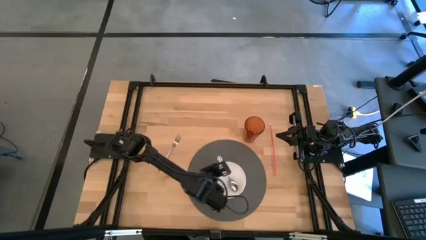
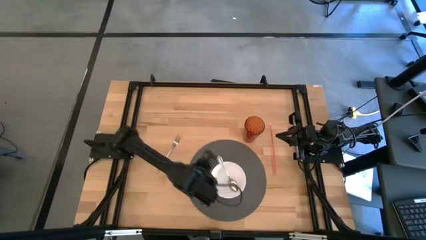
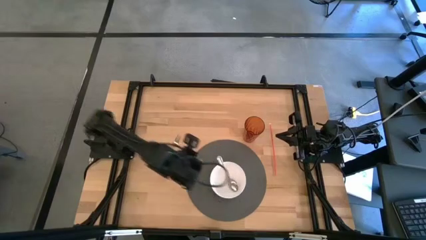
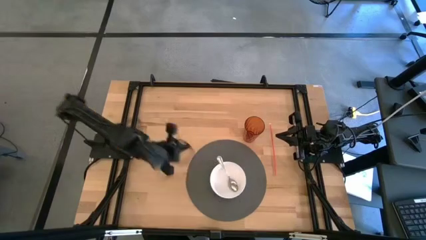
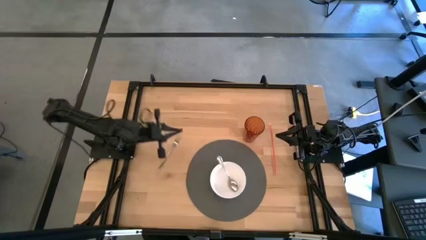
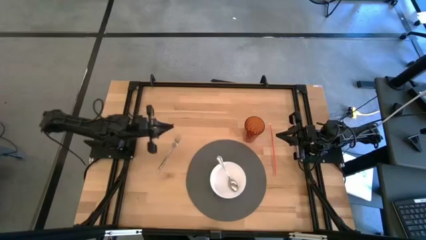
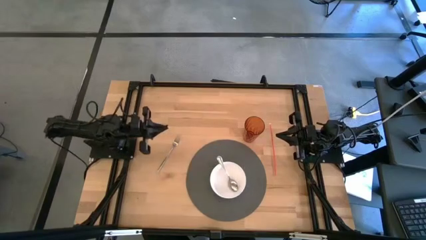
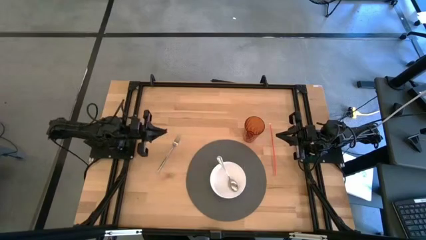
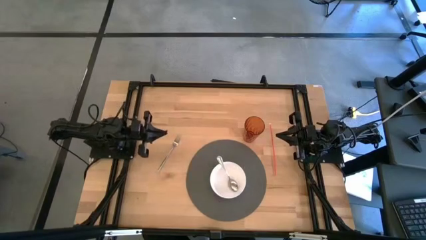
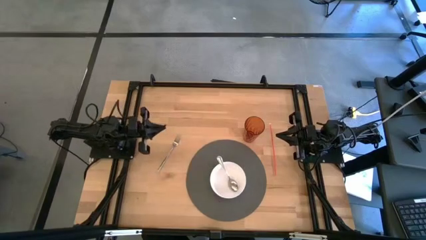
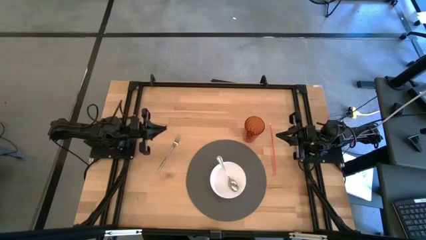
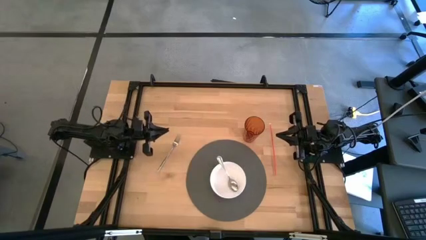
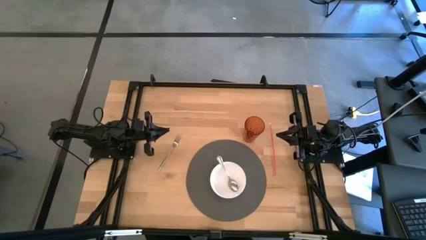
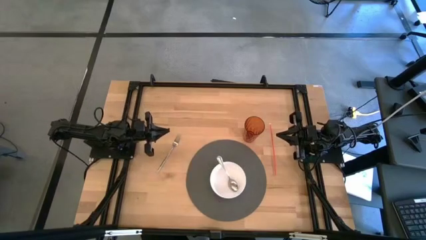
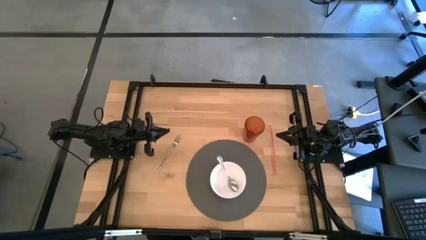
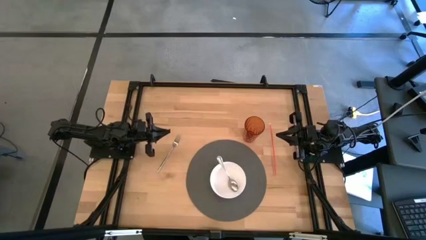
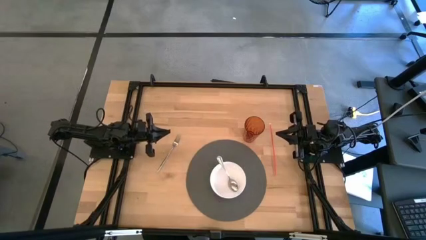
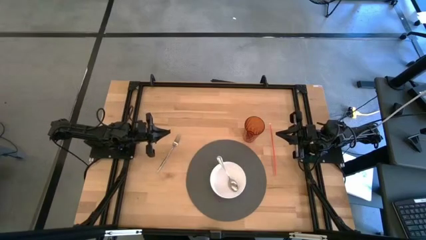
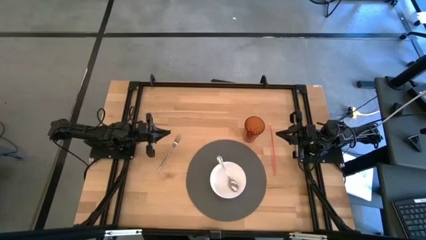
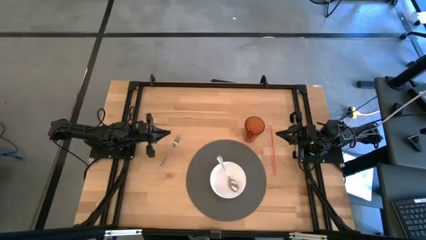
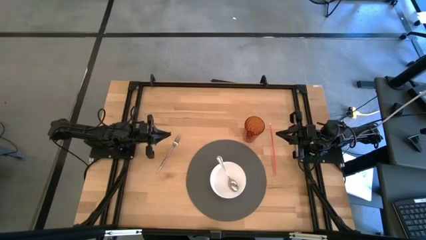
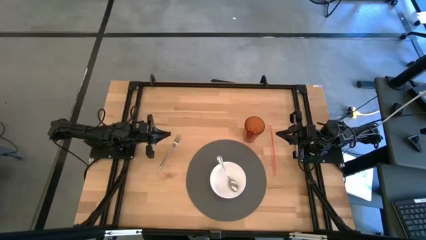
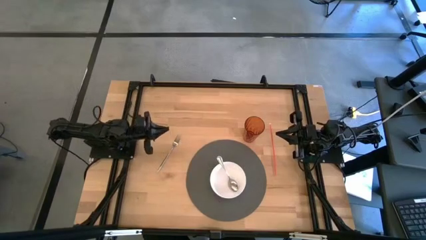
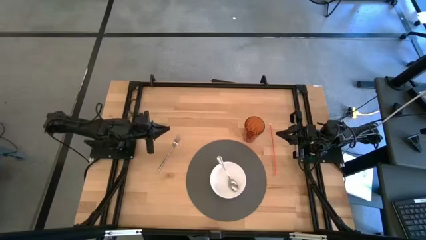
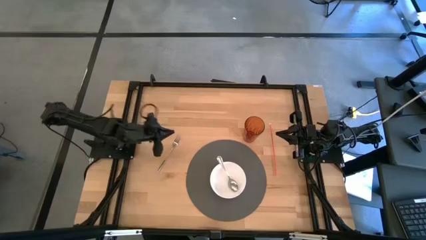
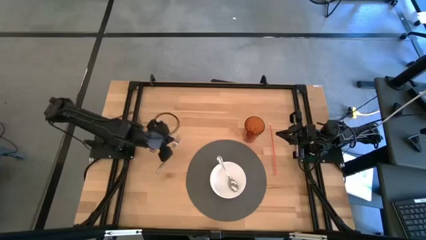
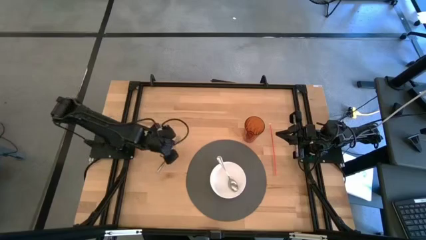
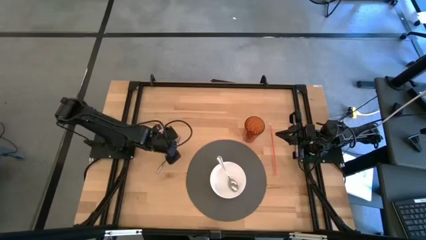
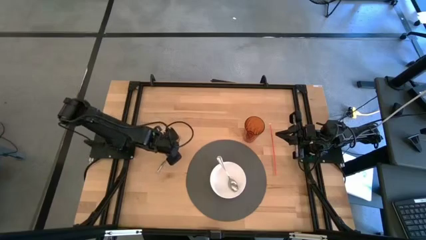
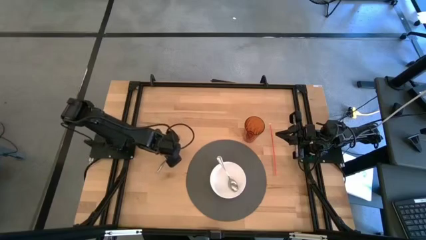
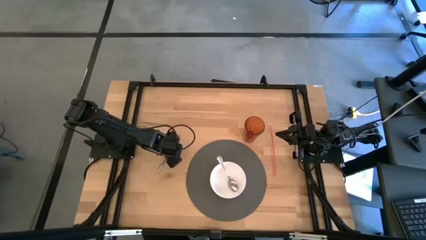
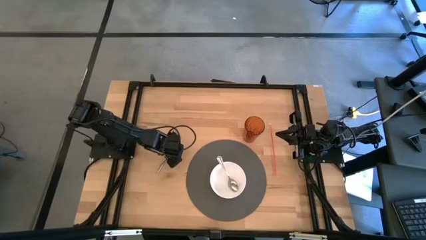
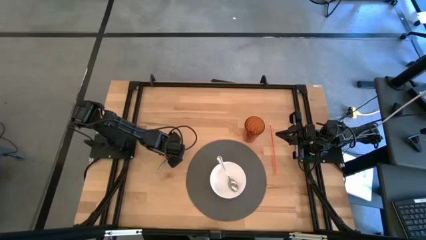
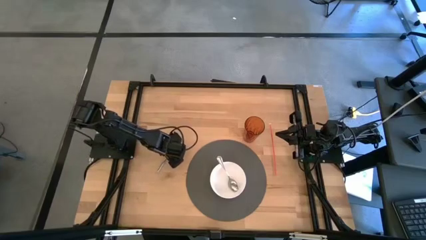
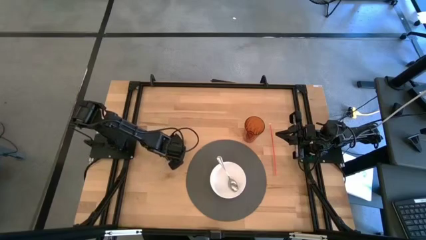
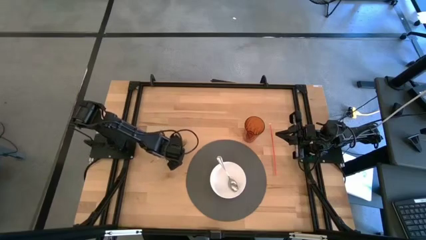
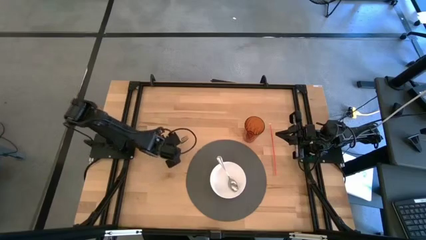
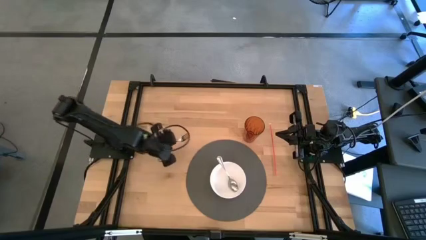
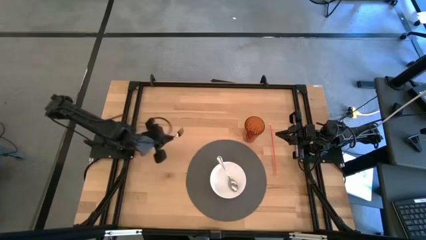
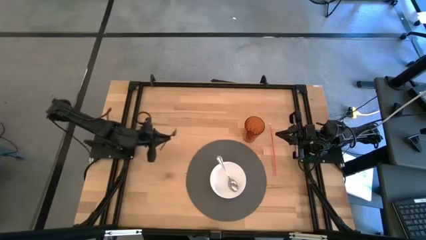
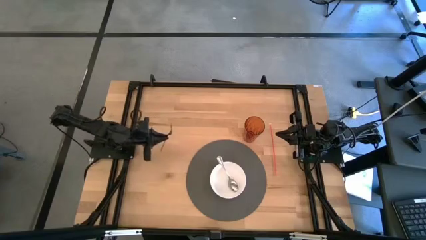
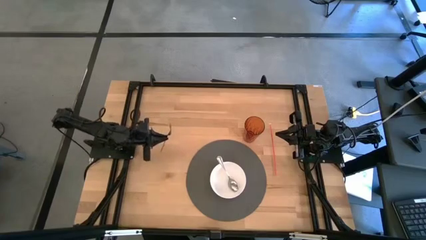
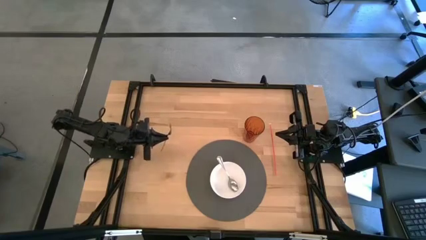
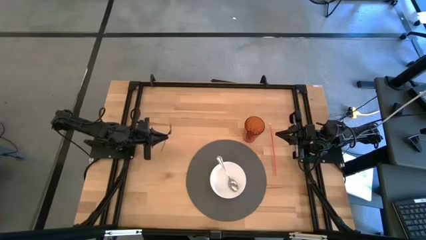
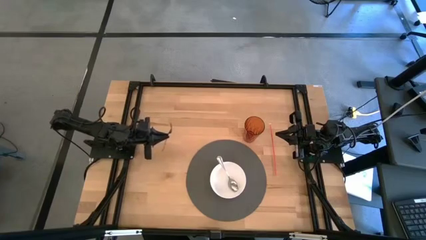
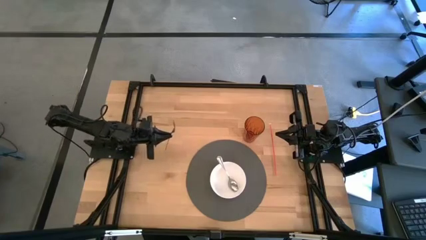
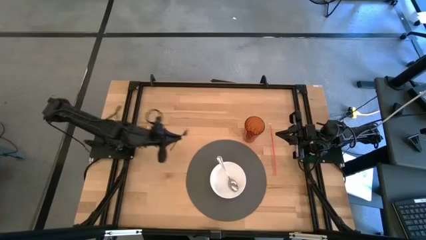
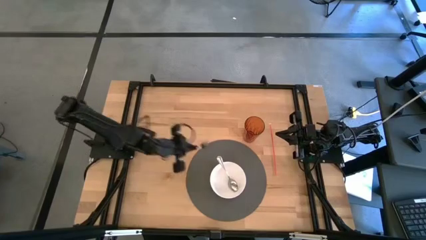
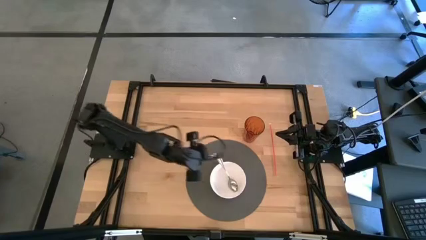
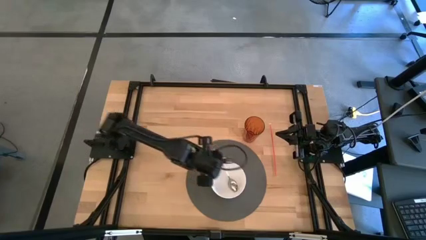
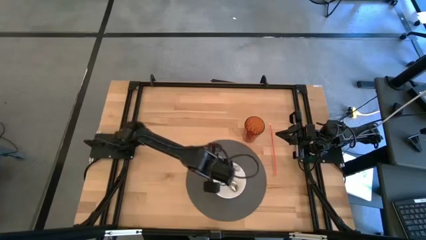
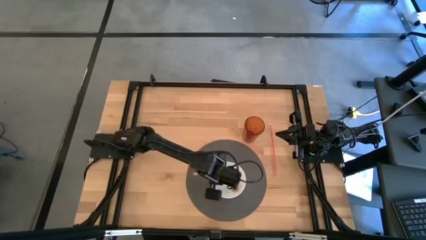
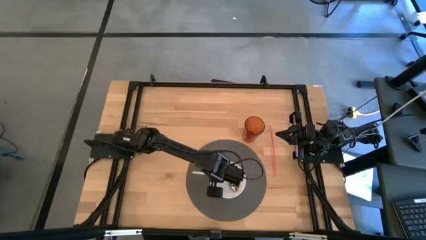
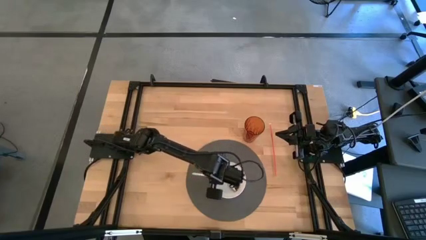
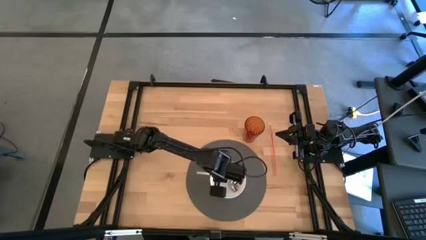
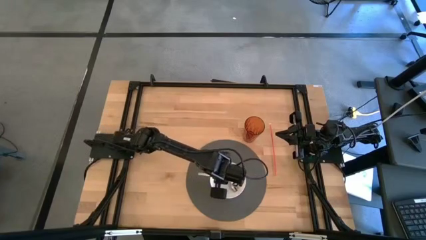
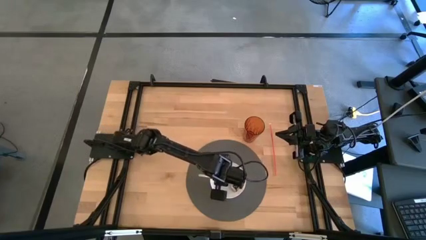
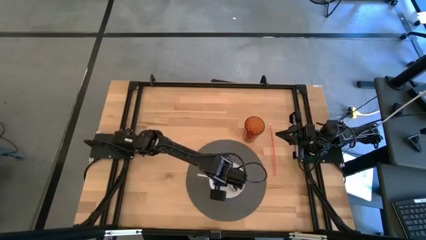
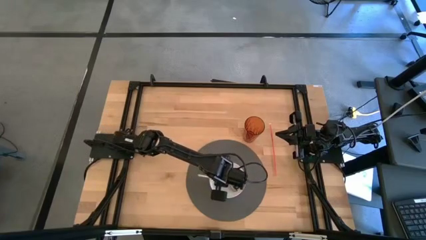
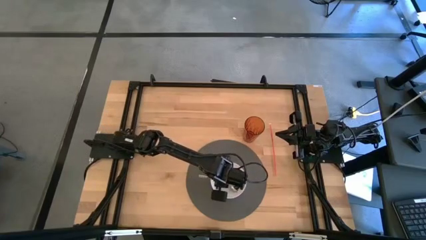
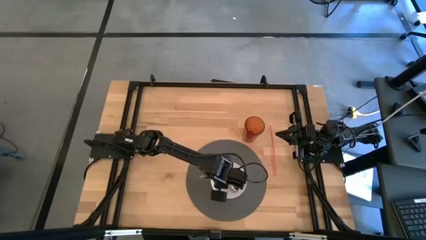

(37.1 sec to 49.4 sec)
Task: Pick & Place Utensil
Put the fork into the white bowl

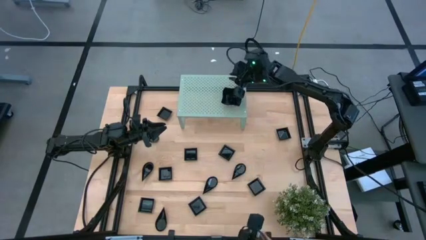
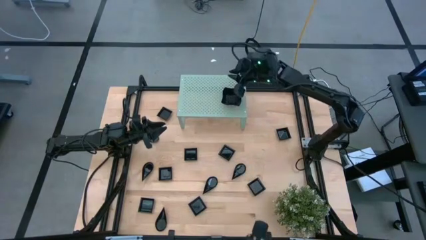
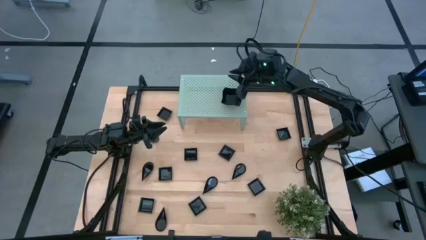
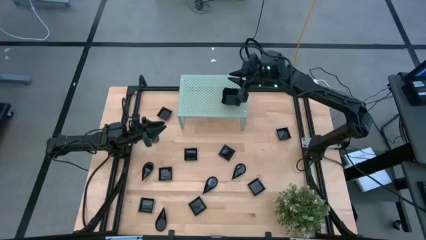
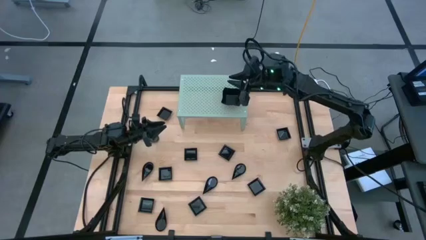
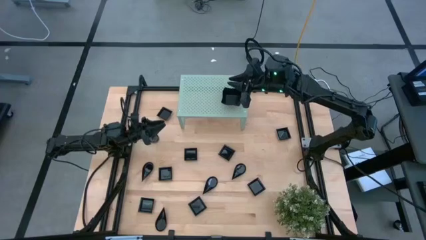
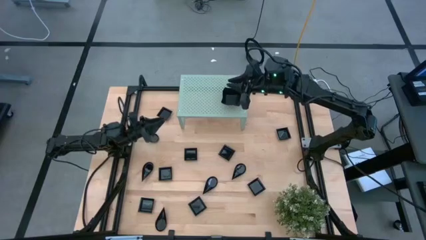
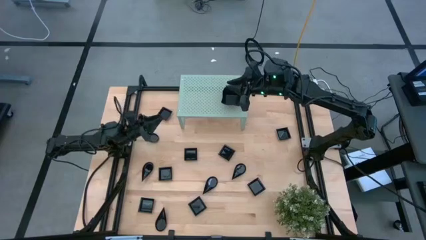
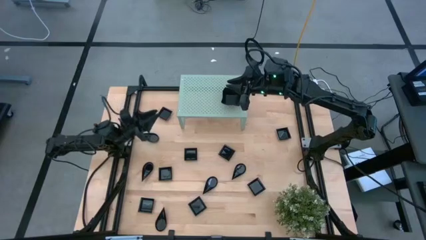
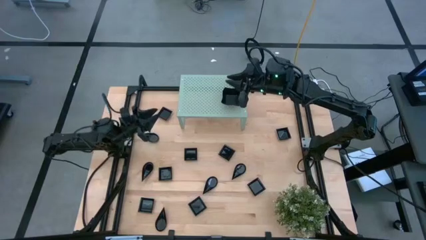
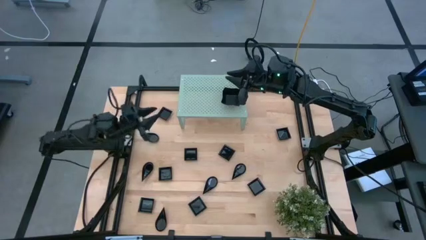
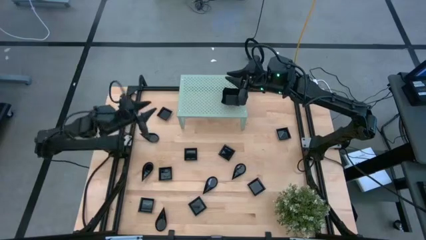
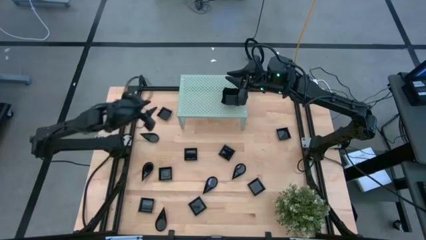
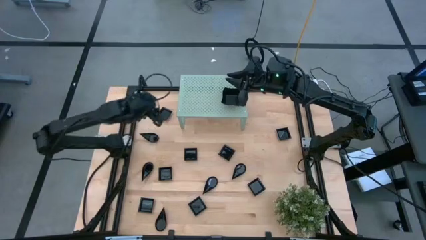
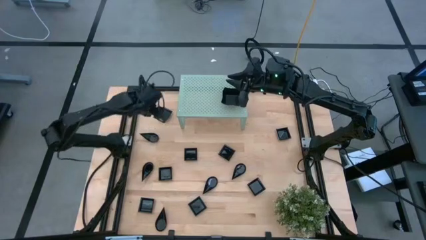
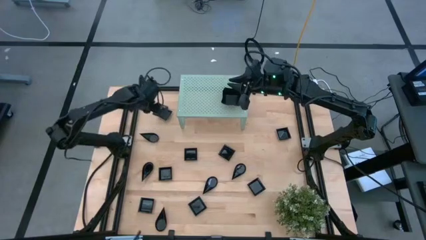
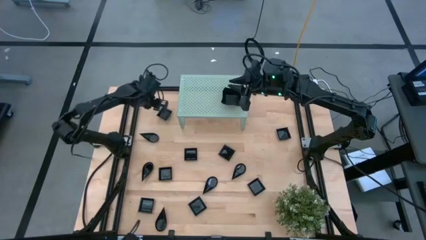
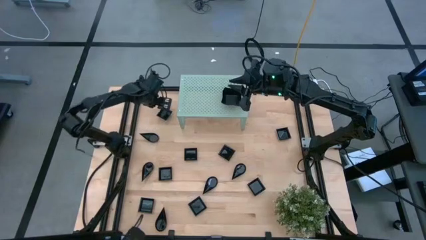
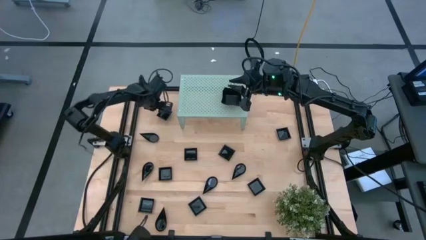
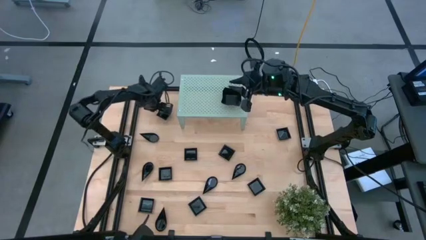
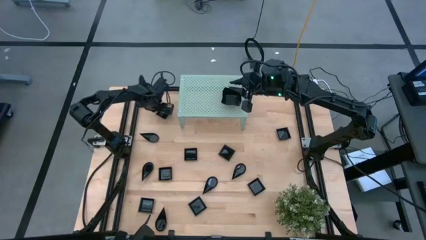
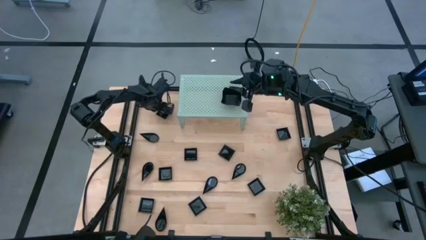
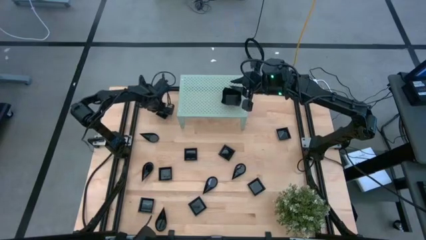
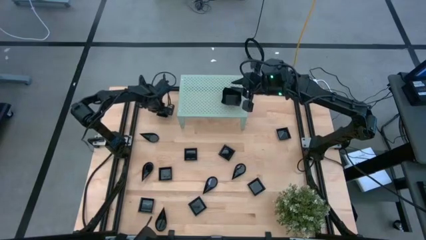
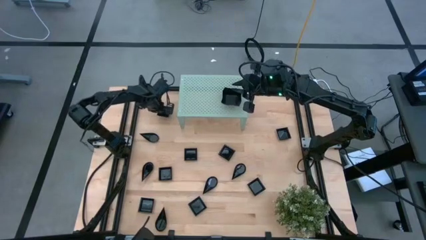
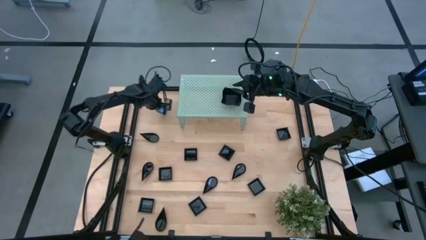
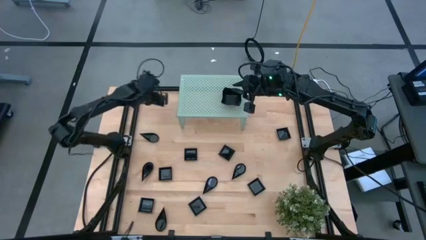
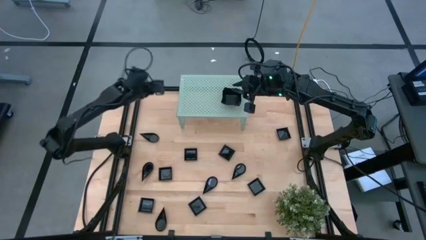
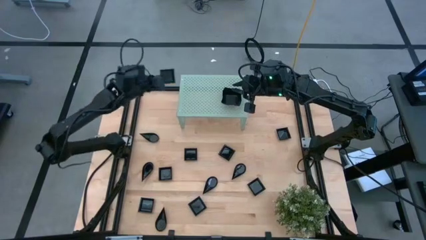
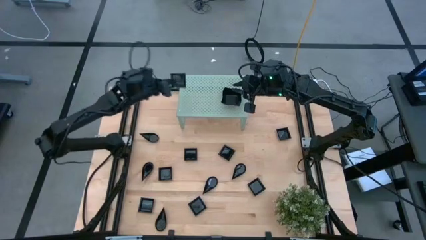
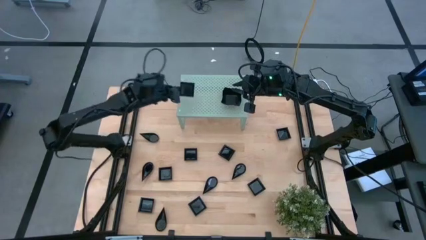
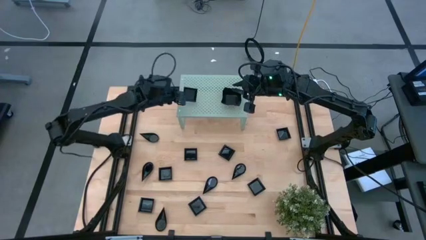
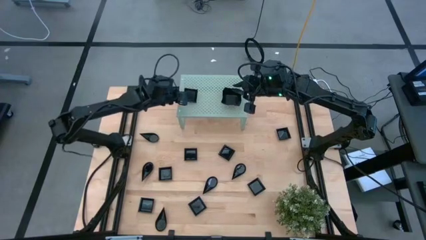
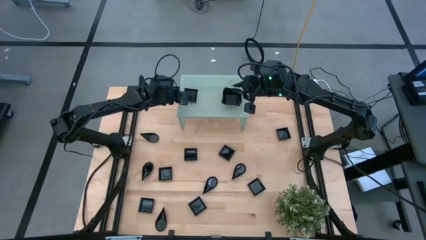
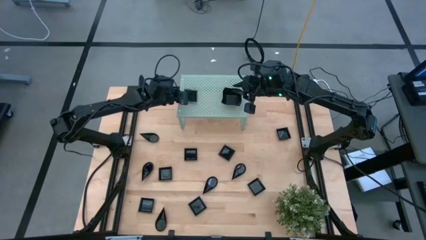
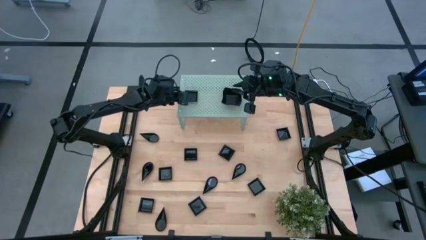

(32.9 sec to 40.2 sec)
Task: Pick & Place Mini shaped plates
Put the black square plate on the shelf
